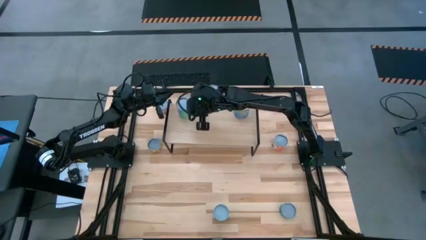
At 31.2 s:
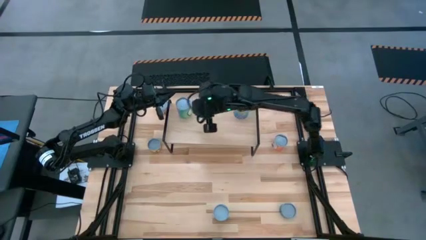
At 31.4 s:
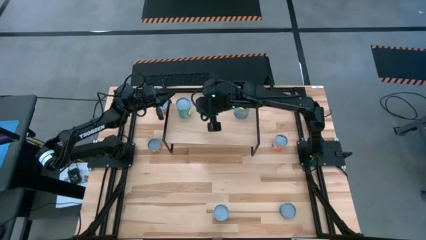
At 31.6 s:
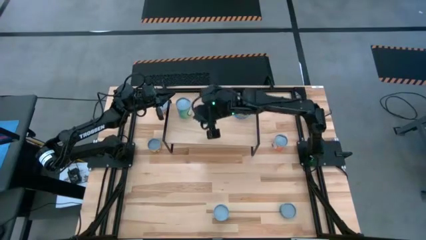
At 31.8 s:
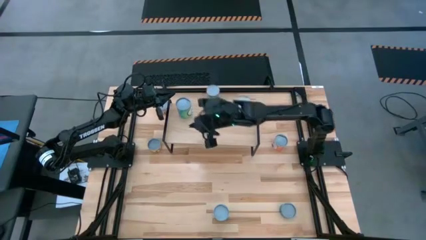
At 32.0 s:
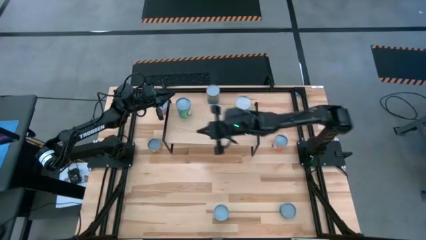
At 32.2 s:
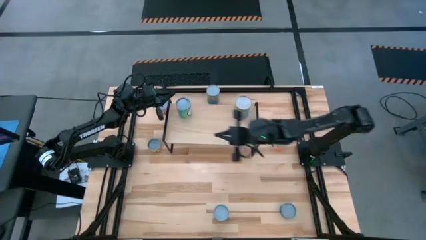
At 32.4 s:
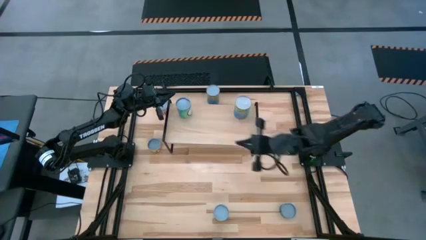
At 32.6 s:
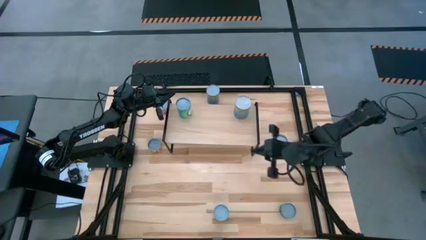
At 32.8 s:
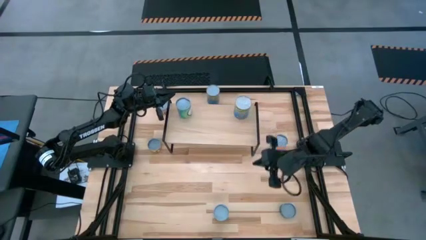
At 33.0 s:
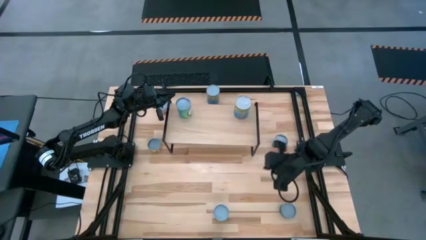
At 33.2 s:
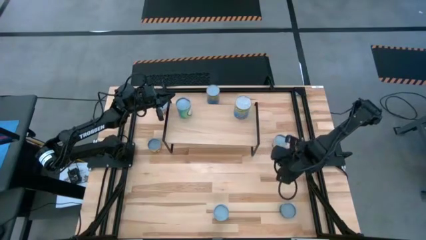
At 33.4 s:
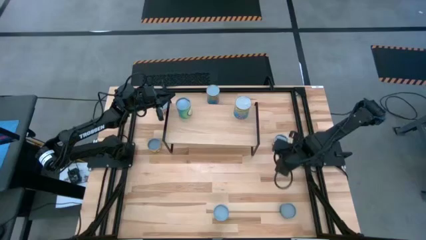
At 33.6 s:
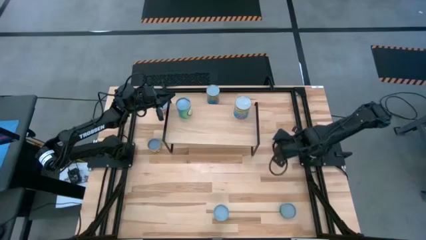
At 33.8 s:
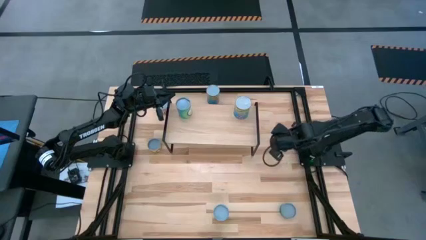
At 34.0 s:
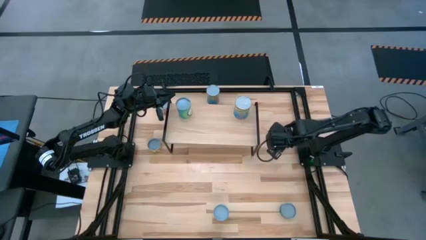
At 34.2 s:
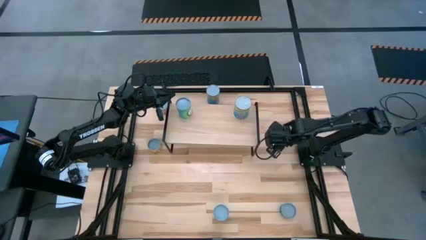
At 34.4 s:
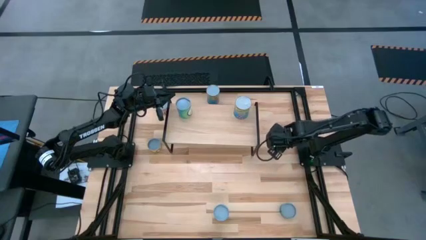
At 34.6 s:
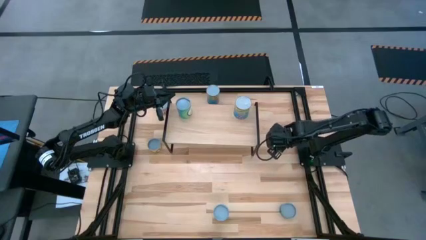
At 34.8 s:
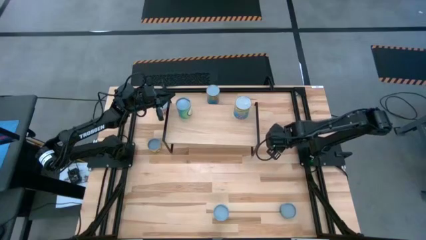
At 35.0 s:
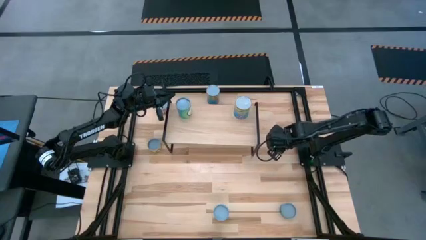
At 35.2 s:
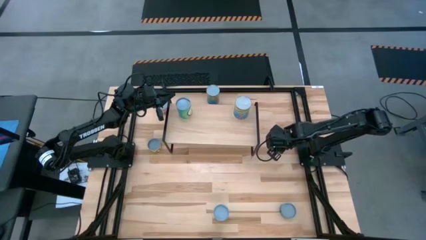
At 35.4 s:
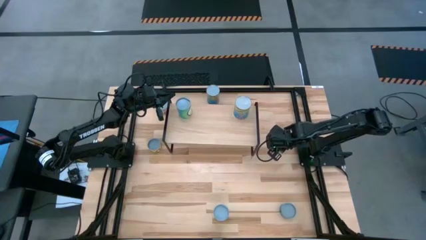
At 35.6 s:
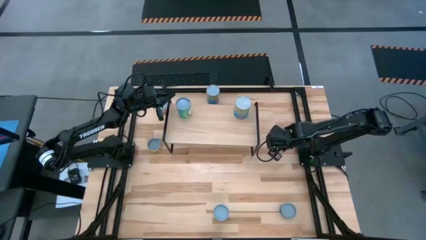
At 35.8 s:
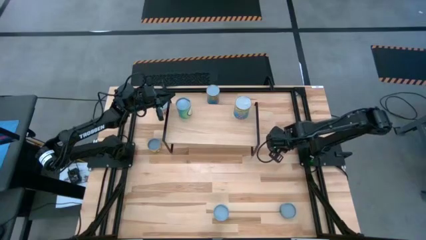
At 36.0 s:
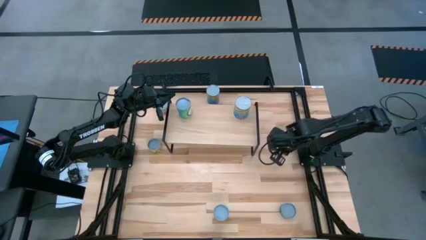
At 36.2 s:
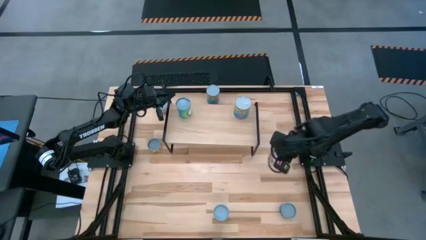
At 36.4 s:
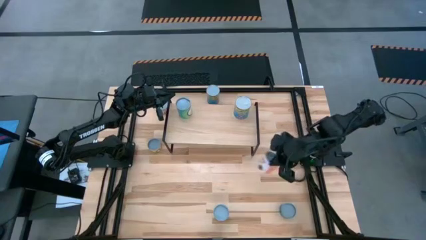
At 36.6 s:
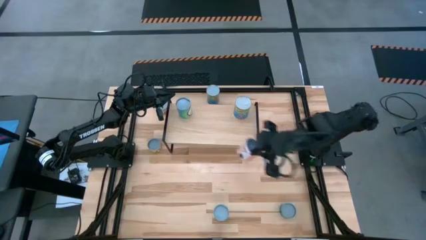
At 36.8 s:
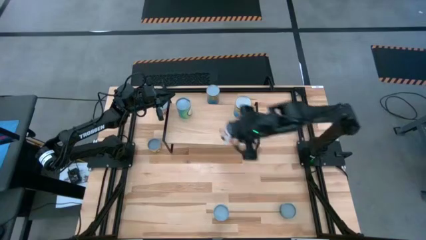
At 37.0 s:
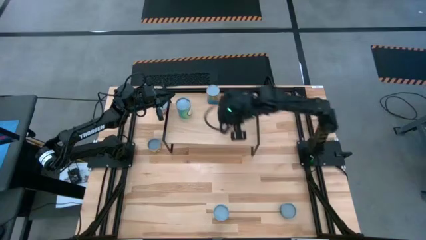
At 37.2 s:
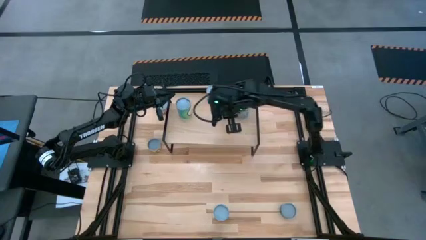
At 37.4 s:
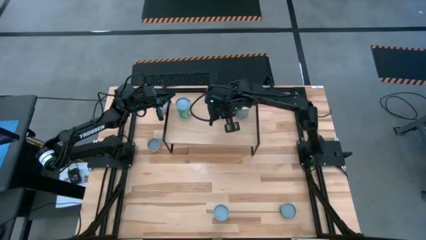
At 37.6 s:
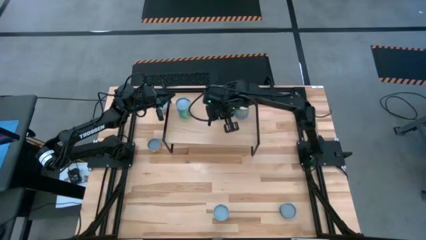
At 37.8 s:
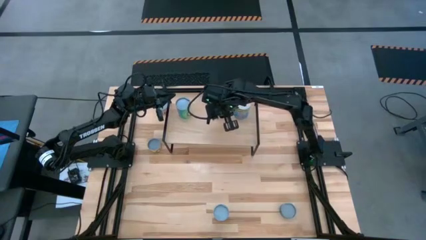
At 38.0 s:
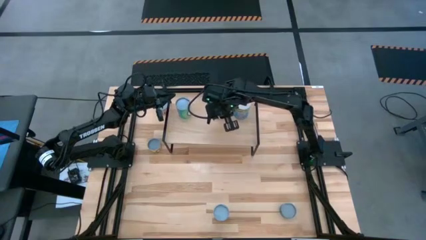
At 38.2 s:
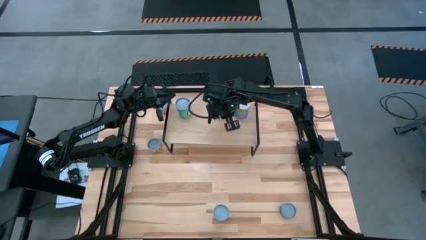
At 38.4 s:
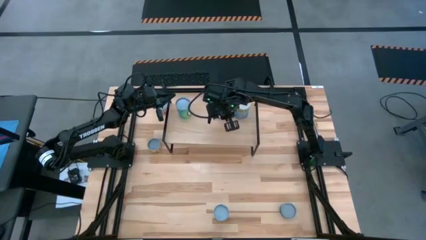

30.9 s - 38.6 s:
Task: Pick and place cans onto a shelf
Put the orange can on the shelf

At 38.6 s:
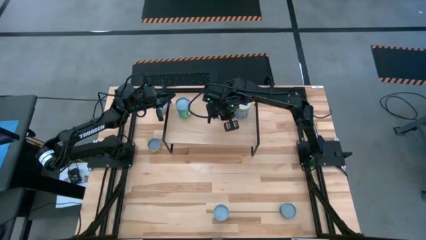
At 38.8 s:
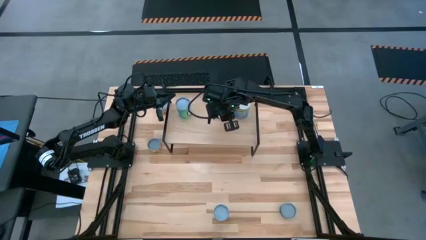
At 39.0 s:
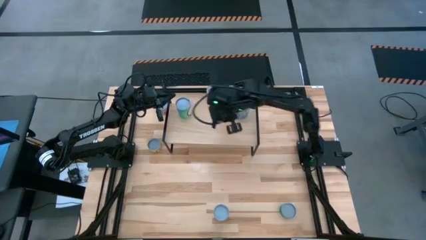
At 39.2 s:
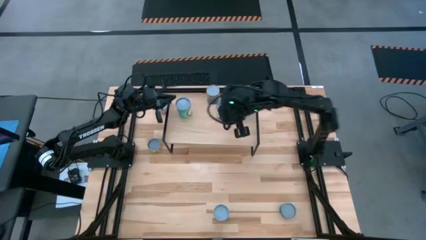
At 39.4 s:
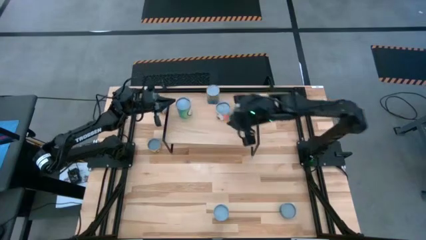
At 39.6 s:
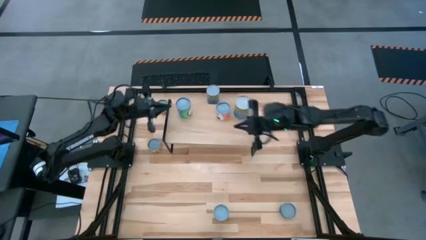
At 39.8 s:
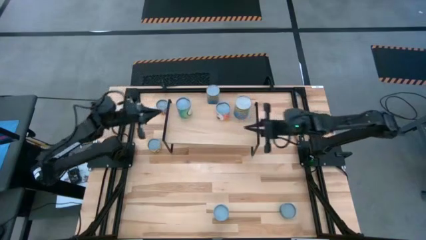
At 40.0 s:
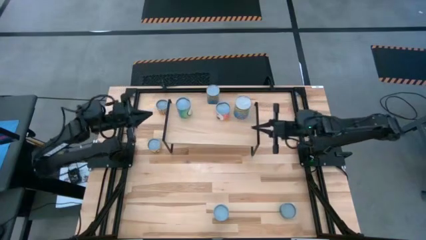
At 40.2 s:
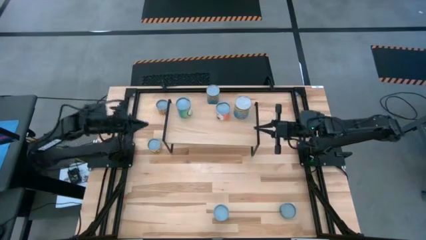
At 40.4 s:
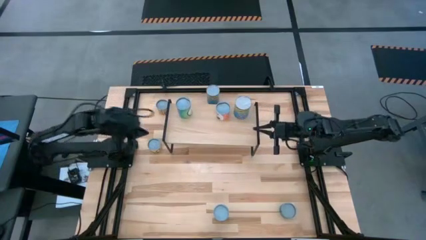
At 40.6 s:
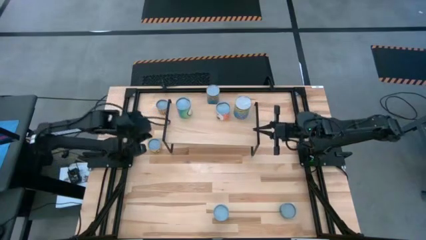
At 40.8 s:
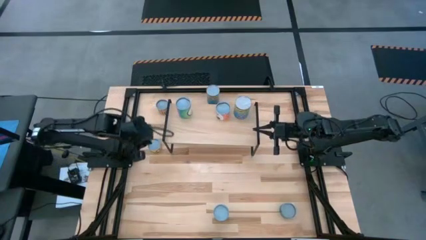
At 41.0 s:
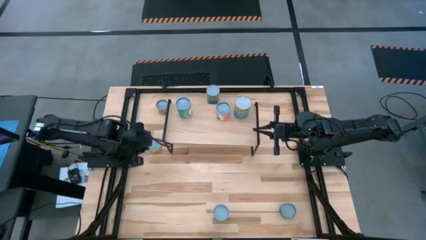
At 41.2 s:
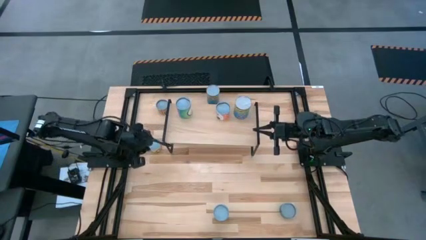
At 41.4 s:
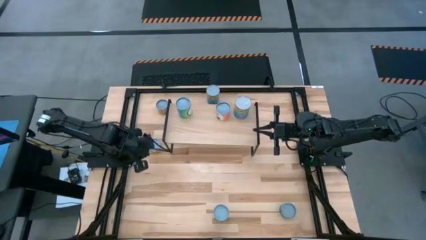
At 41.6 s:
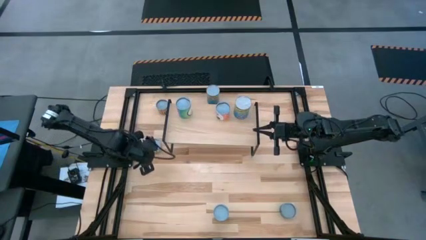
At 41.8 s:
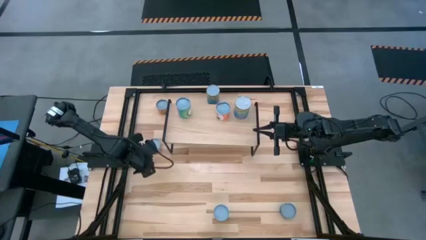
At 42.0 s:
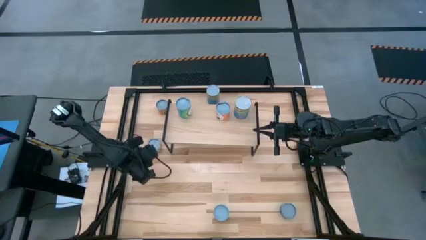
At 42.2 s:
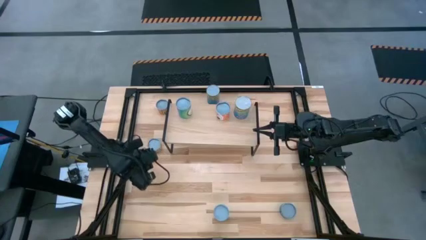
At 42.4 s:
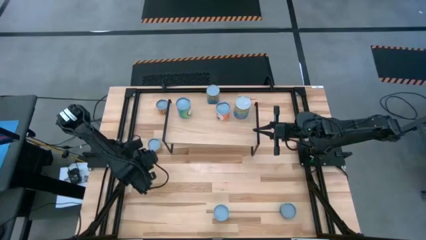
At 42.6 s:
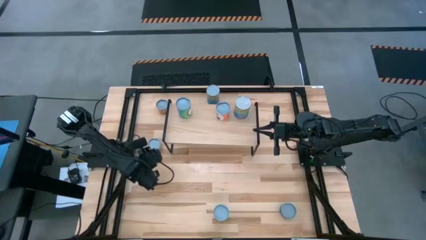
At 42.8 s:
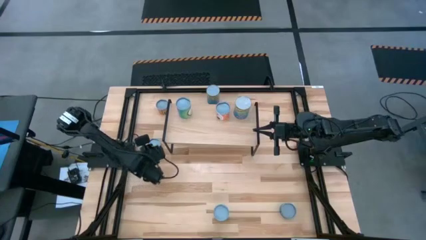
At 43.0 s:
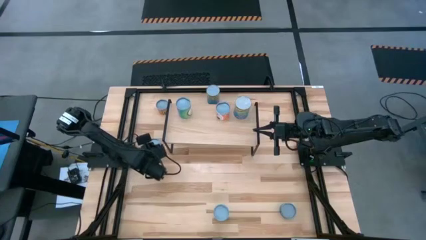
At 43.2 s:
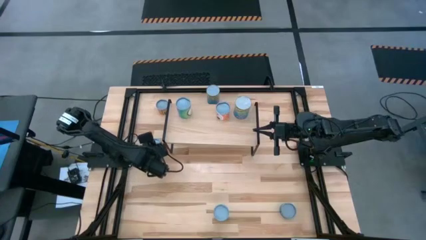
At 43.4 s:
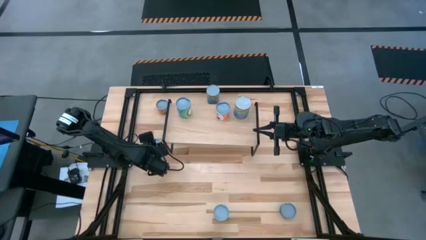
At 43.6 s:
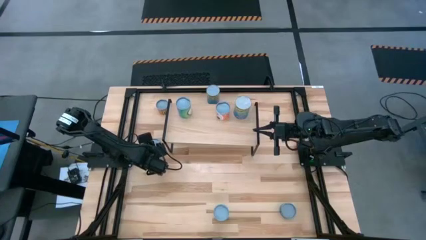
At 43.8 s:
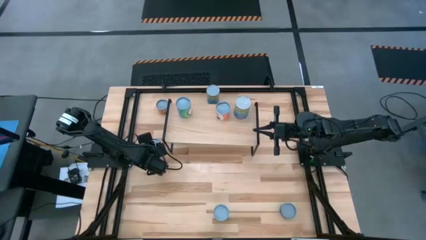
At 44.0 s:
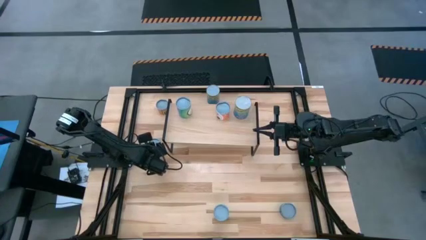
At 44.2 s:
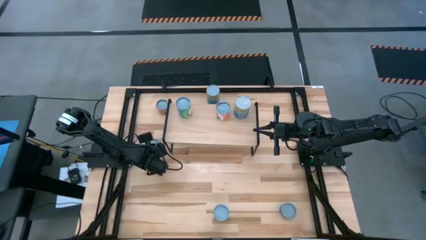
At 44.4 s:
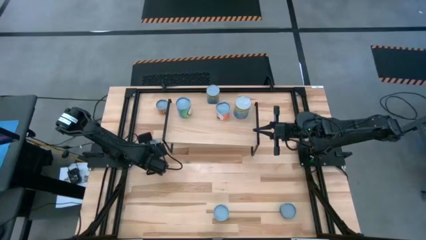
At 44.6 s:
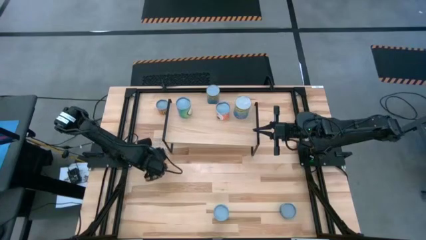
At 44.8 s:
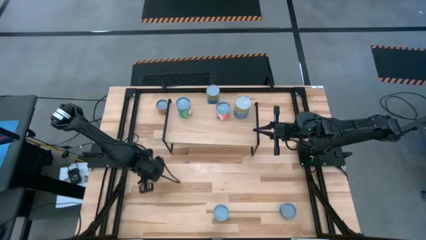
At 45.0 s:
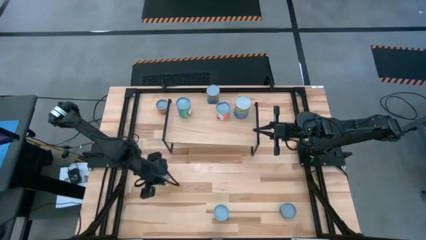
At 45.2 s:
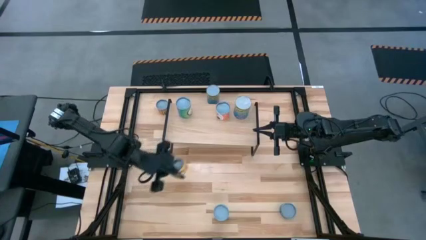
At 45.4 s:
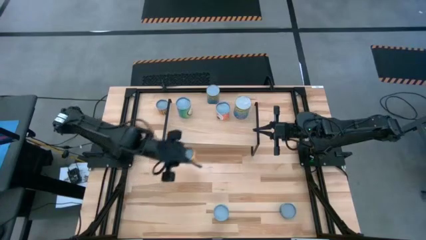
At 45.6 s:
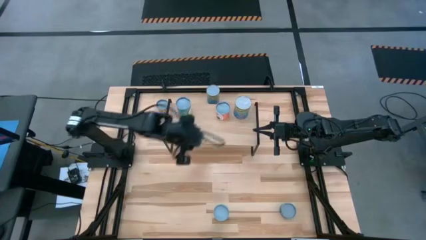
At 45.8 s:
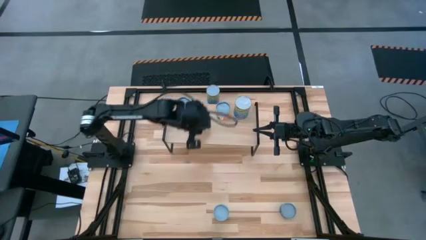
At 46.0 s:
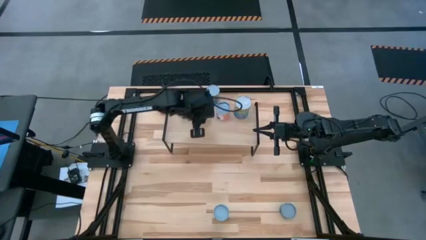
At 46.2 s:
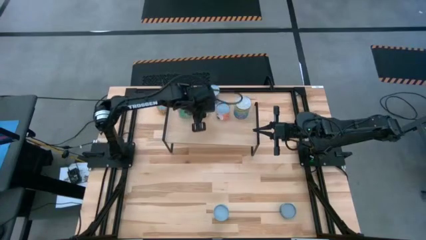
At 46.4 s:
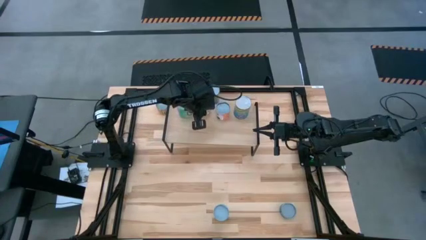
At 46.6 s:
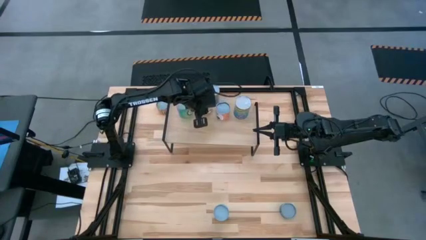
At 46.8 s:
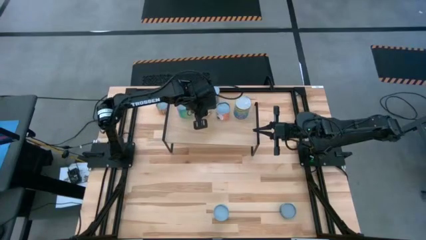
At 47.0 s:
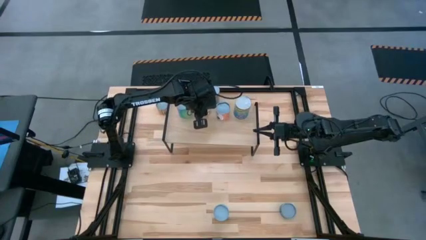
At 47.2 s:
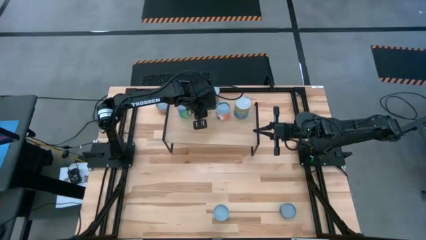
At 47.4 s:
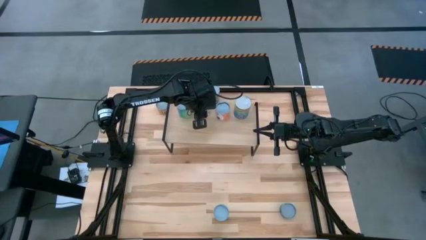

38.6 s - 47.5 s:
Put the yellow can on the shelf
